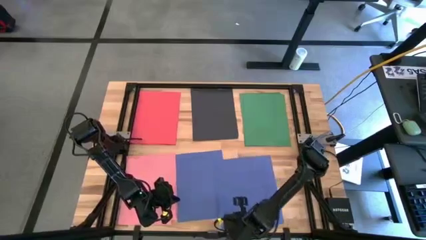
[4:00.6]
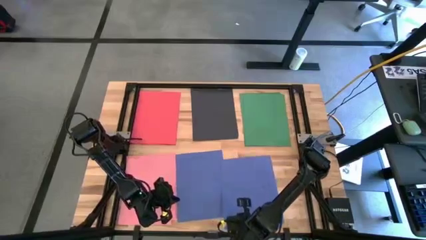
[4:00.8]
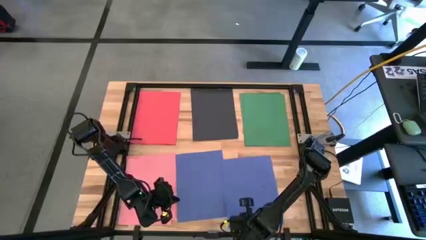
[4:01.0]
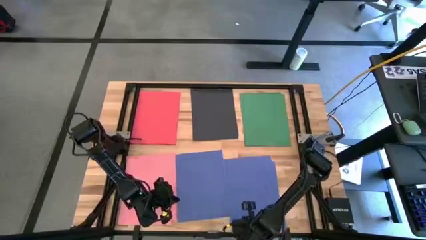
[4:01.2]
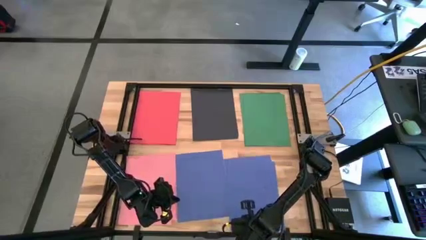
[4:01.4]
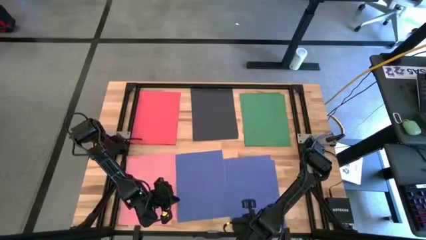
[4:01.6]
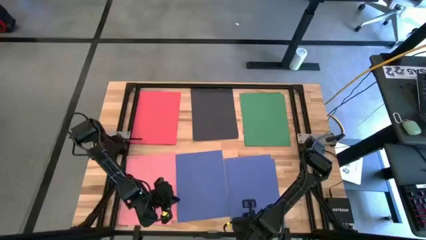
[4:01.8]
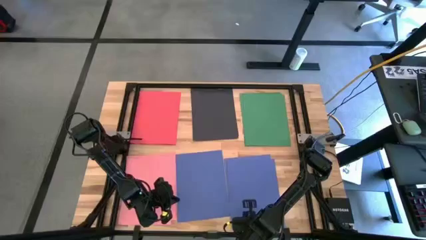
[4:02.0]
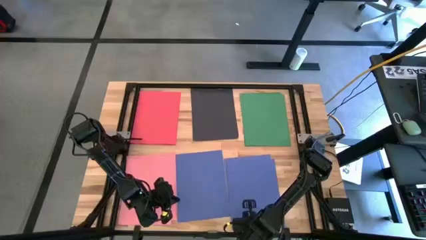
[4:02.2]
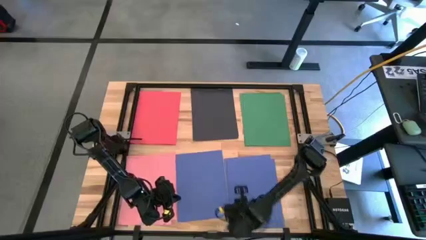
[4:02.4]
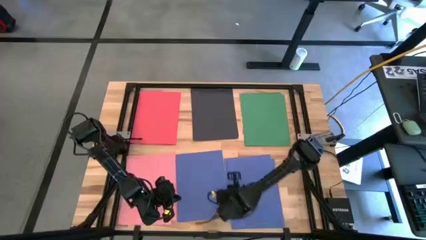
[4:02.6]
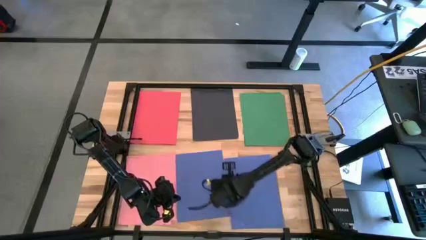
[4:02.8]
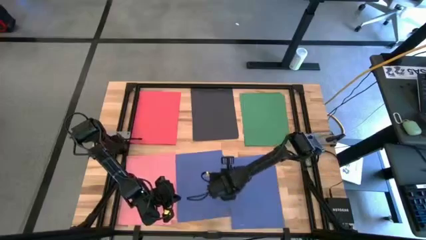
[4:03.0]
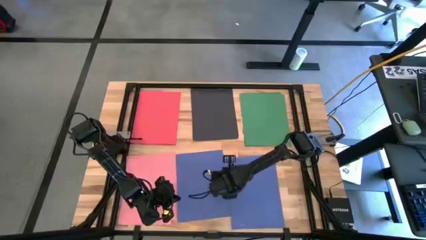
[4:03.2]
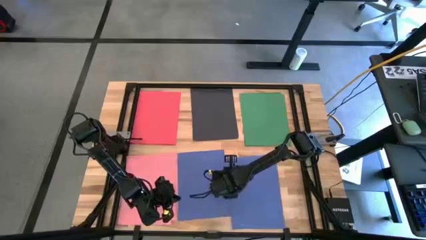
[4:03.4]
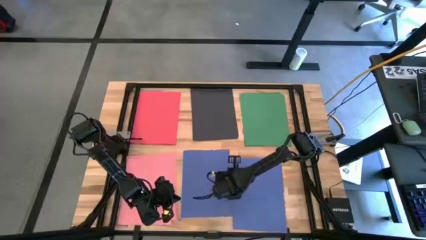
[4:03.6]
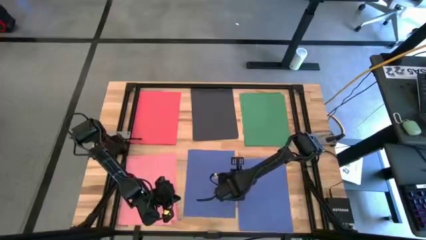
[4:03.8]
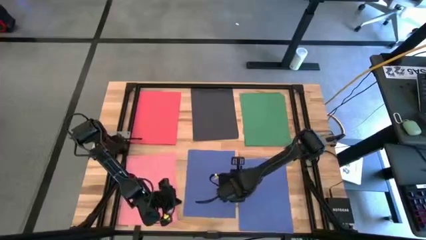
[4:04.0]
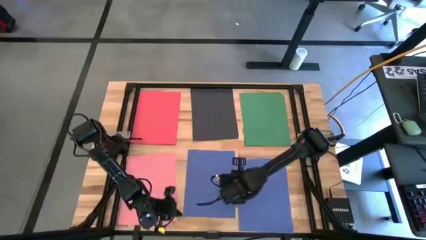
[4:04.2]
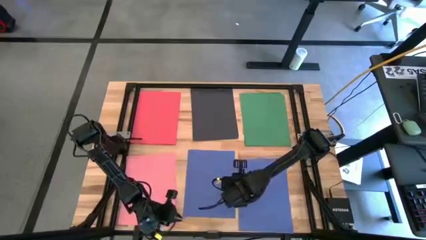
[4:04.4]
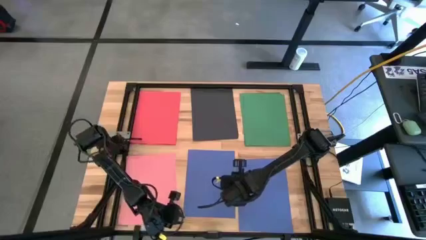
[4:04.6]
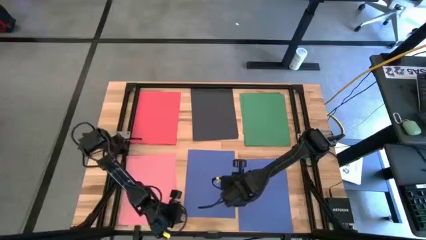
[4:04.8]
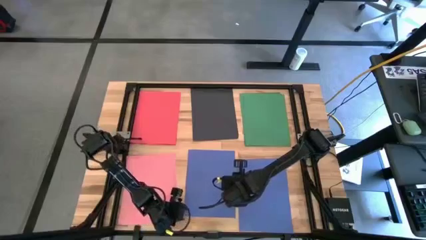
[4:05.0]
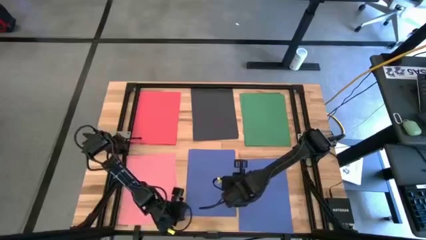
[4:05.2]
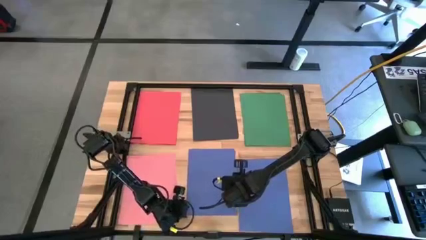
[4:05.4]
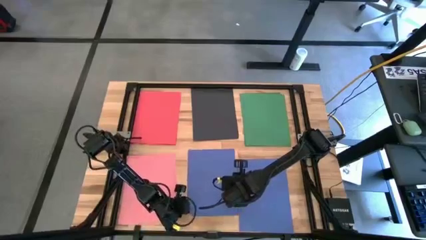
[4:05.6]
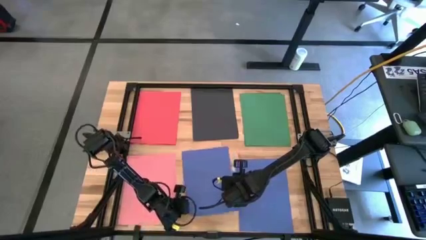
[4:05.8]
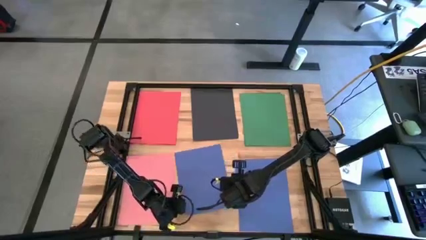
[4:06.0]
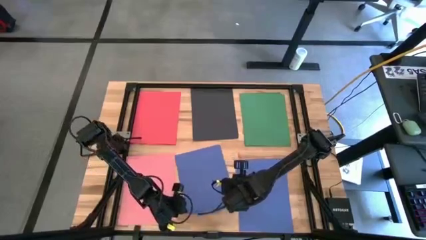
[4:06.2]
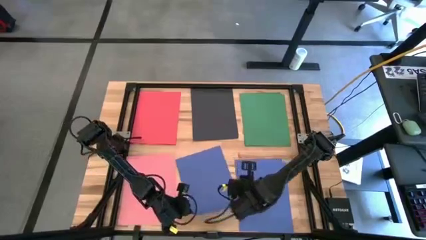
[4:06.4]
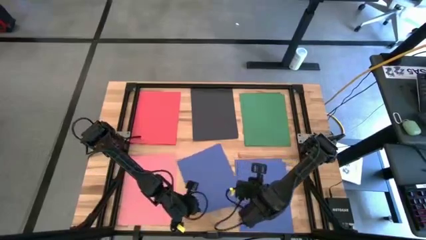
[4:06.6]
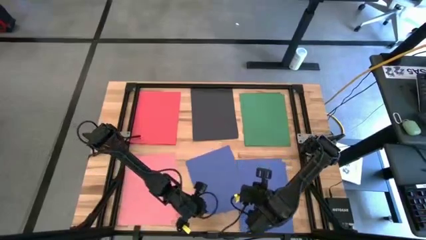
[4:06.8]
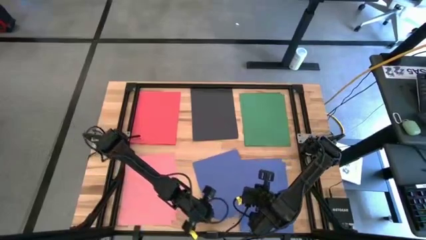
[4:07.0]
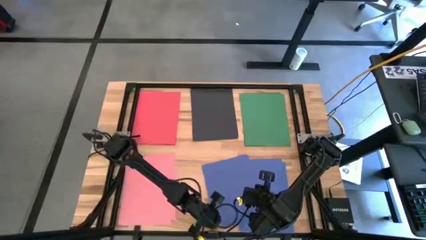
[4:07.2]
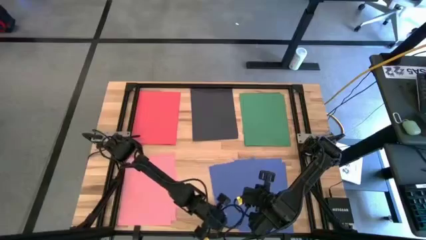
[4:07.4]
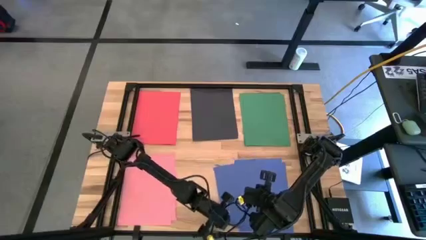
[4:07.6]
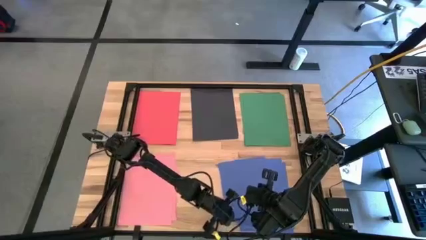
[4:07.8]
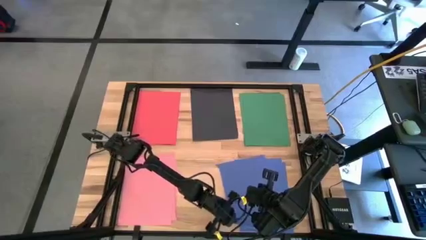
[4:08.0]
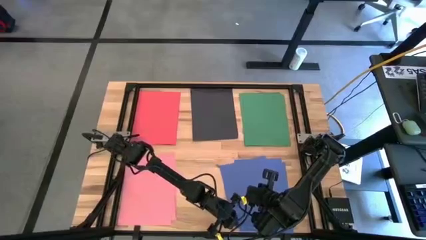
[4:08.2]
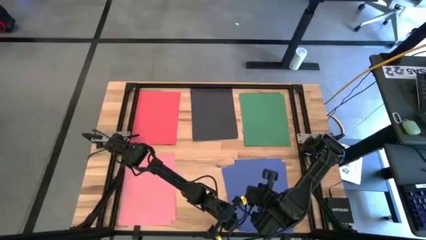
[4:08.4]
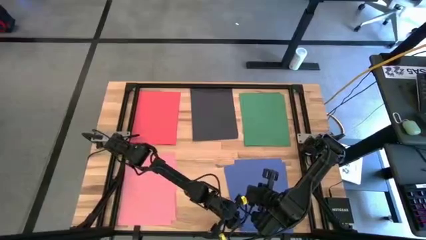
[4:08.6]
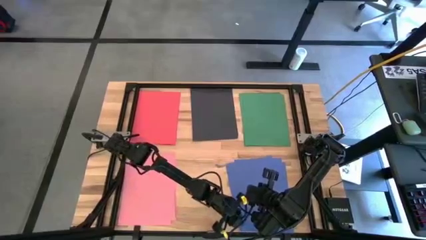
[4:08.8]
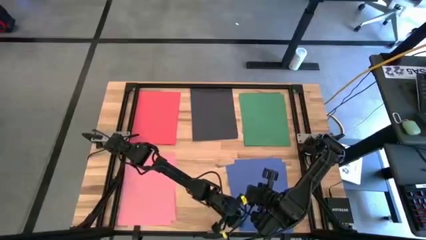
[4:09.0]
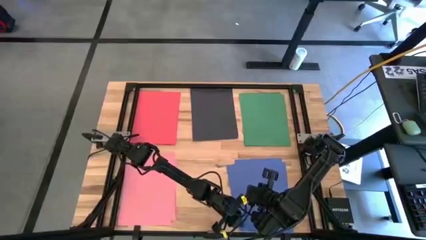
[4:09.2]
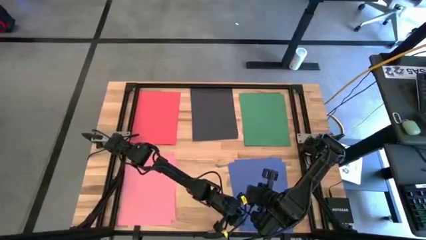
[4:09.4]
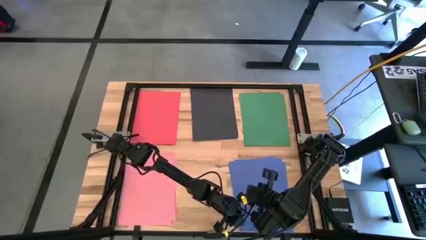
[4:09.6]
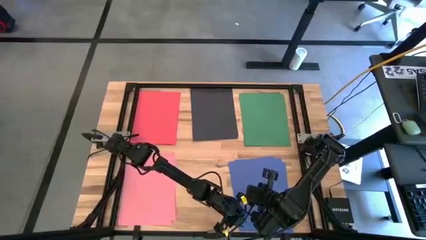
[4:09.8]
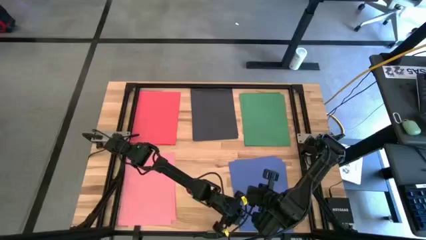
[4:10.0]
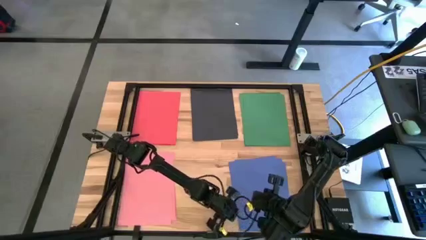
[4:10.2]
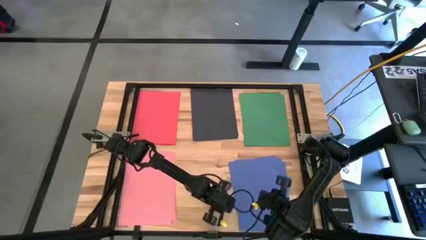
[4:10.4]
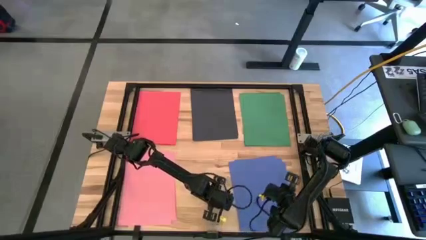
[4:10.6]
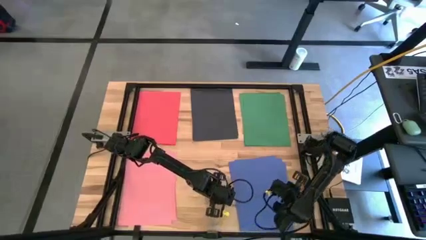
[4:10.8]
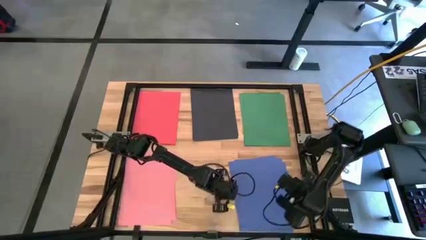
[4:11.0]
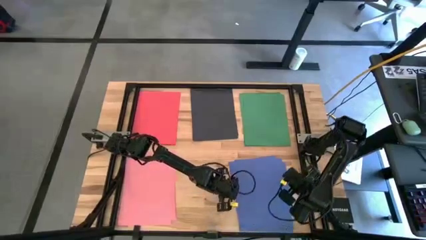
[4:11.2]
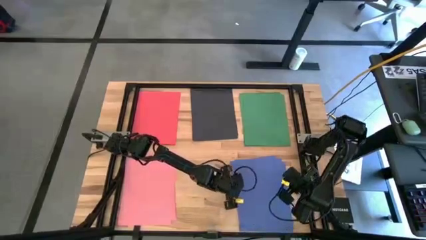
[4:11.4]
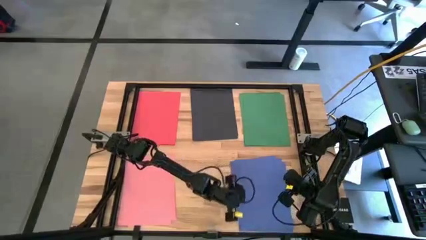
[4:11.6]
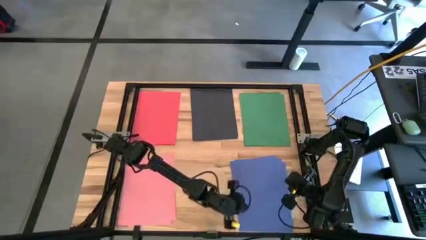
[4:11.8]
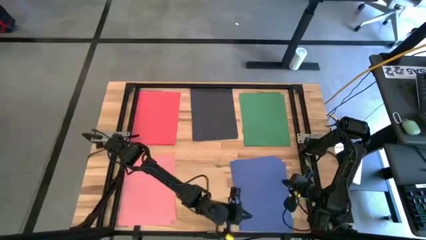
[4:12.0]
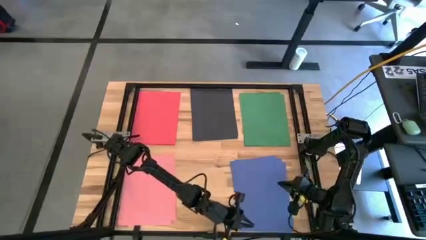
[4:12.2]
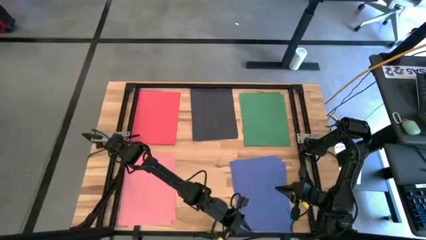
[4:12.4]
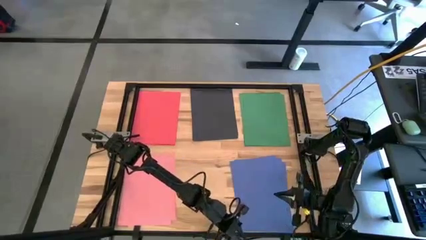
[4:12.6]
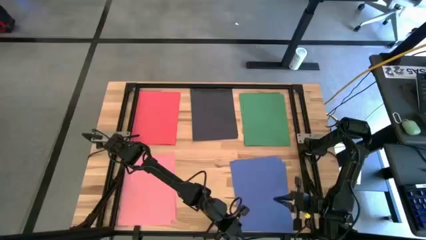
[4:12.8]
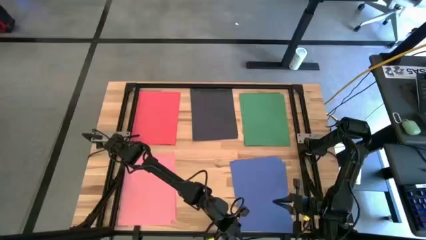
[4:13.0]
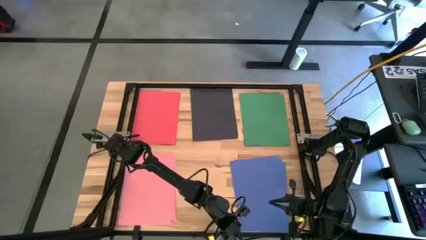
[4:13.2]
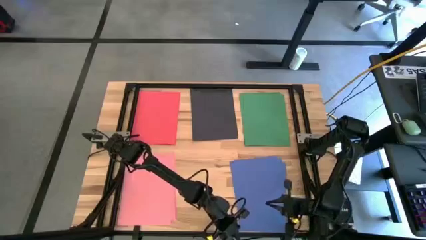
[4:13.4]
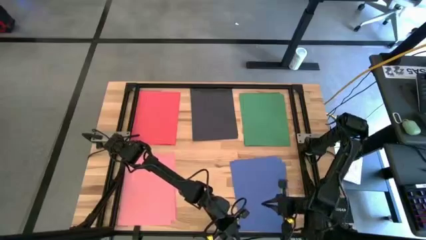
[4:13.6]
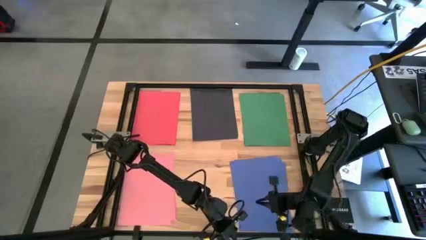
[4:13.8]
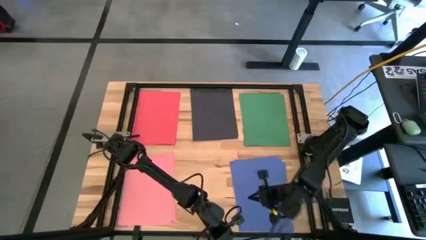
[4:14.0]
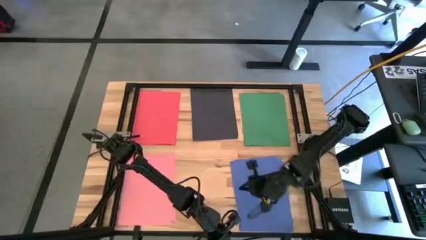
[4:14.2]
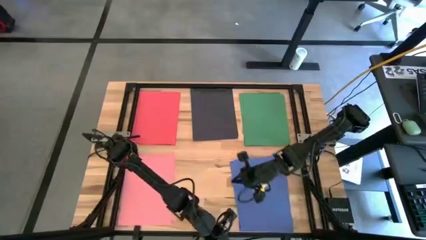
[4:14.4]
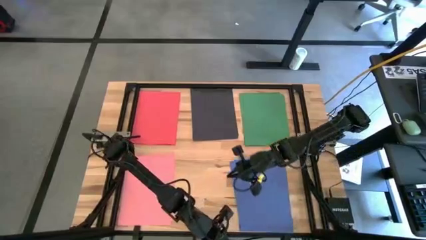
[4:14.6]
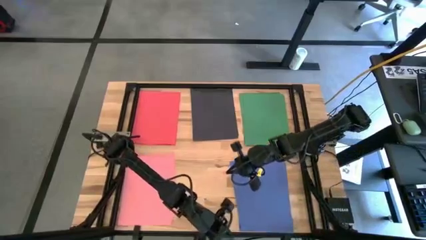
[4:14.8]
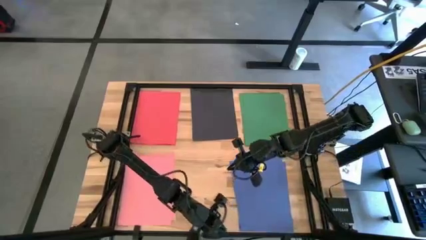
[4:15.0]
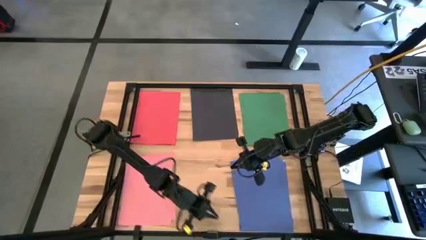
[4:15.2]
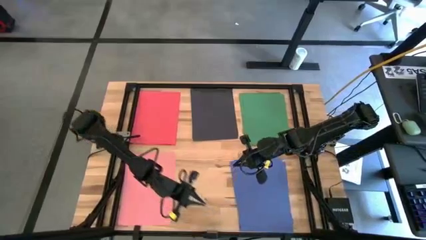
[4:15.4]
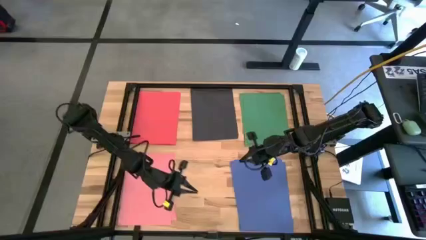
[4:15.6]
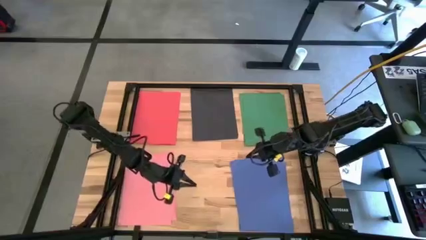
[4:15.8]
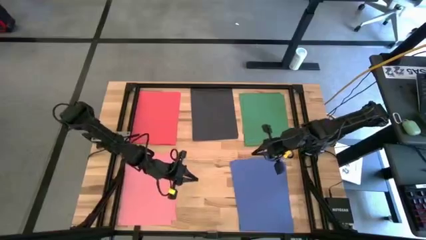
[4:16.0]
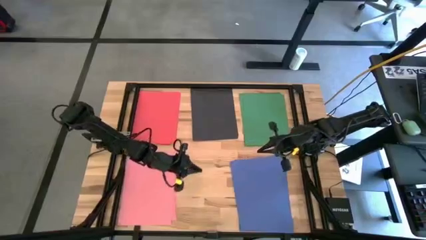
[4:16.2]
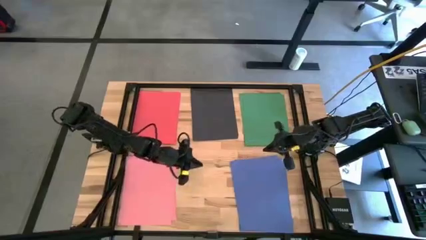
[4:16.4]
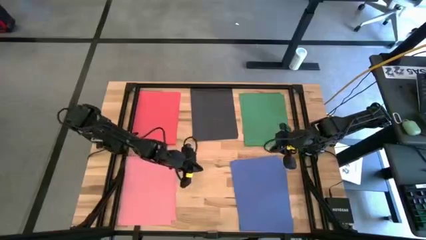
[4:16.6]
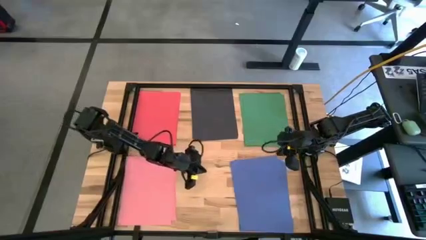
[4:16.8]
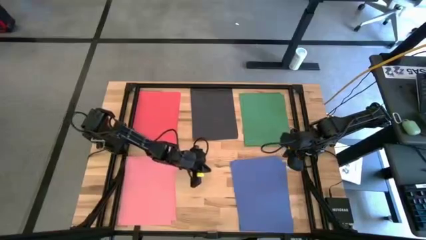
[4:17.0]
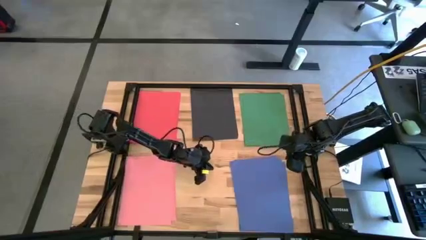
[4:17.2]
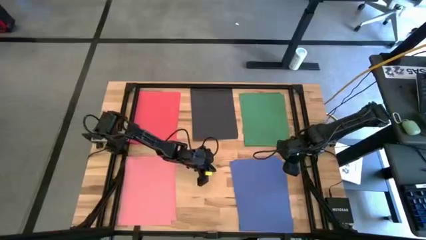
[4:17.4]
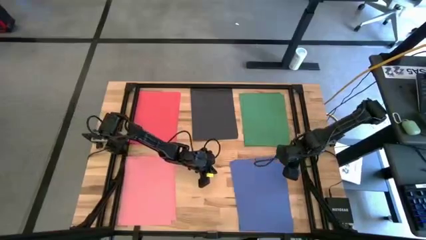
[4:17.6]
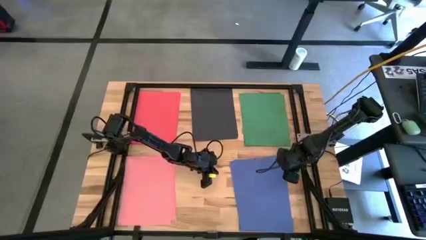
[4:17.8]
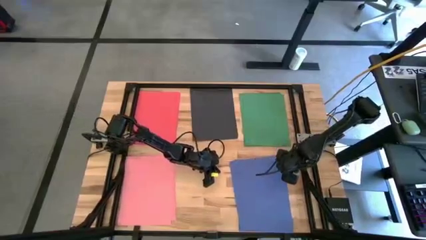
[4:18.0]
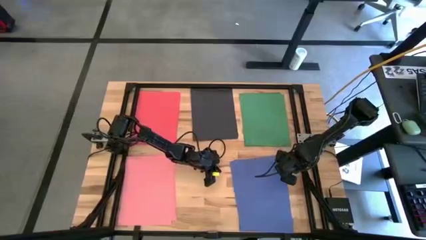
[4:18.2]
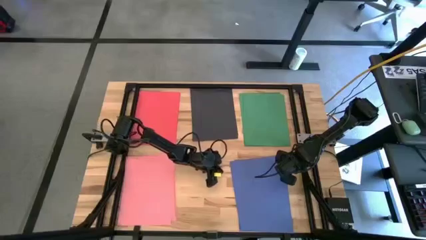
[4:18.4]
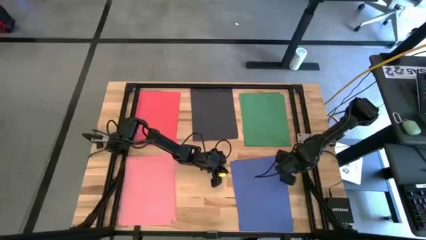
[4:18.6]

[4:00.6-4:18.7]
Task: Organize paper
Stack the left blue paper on the stacked blue paper
